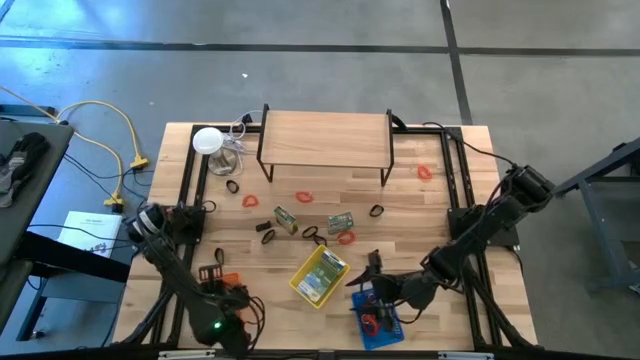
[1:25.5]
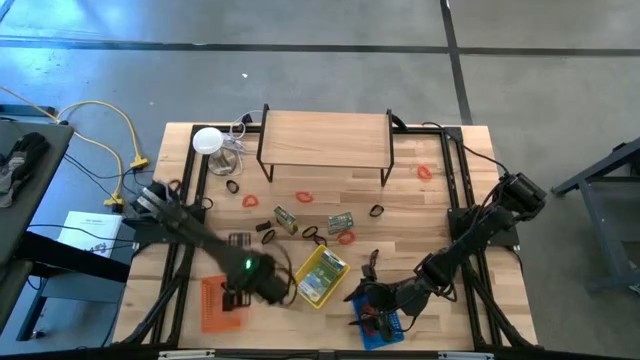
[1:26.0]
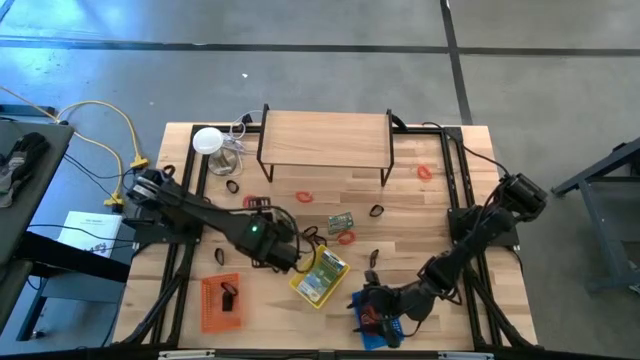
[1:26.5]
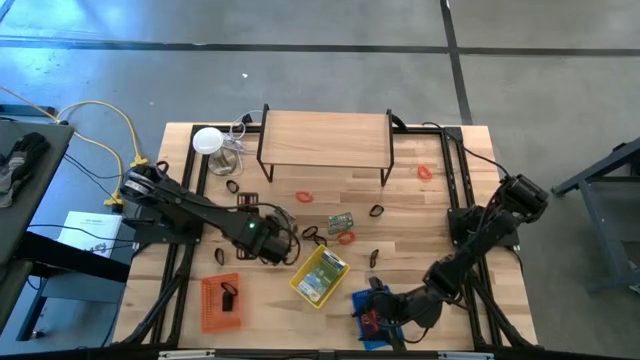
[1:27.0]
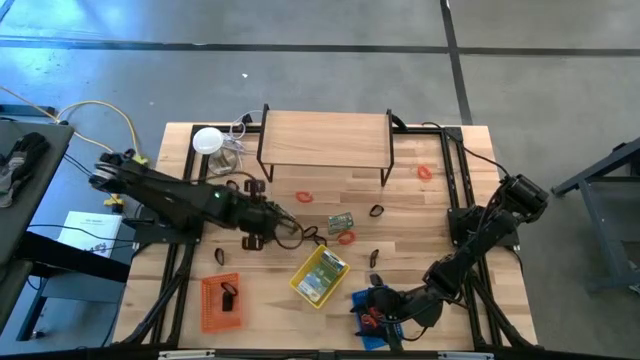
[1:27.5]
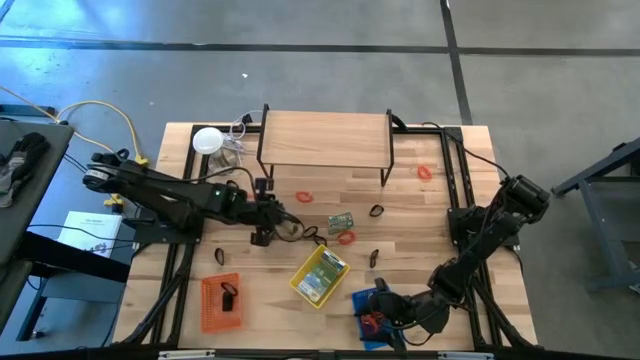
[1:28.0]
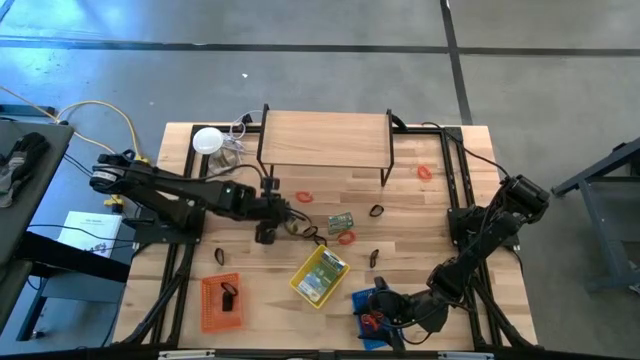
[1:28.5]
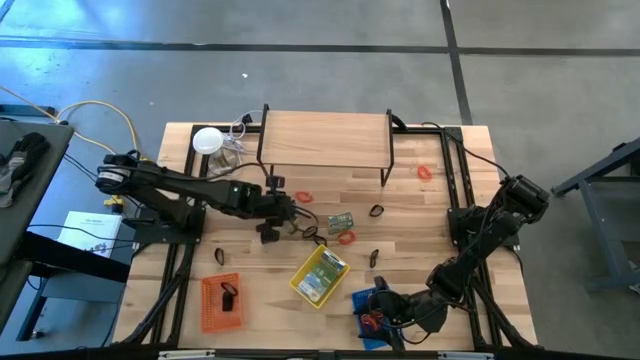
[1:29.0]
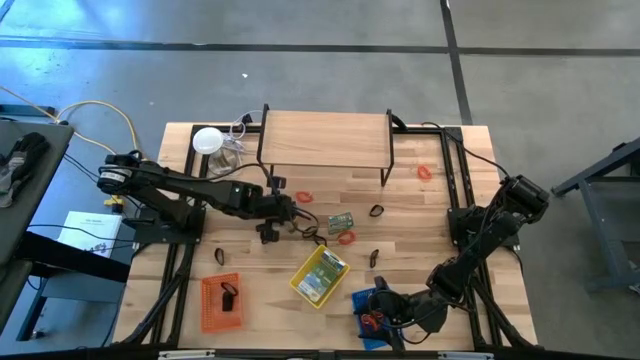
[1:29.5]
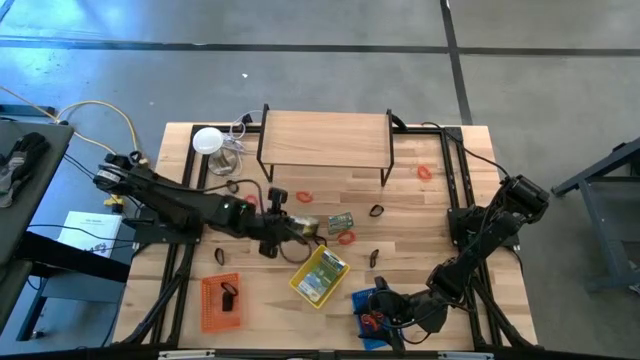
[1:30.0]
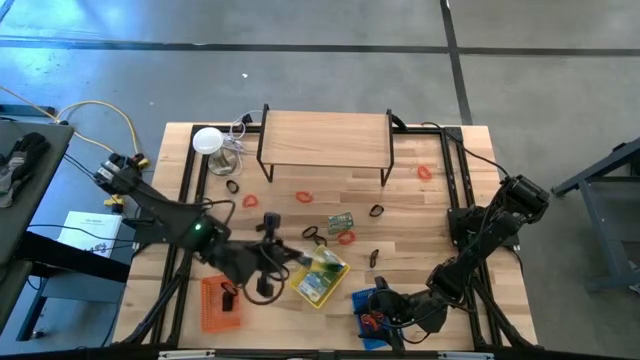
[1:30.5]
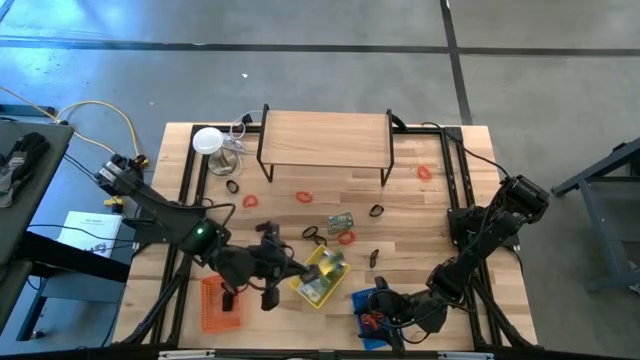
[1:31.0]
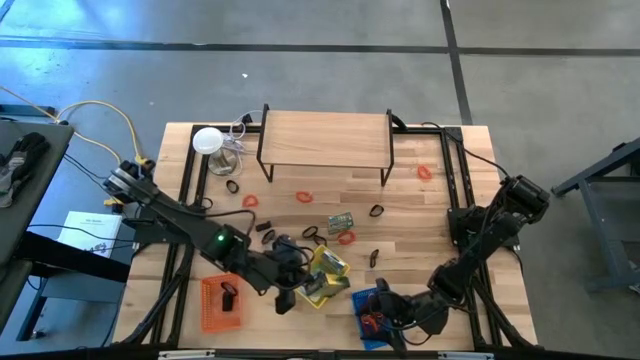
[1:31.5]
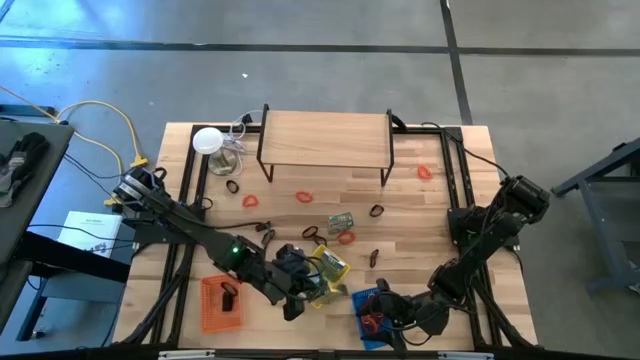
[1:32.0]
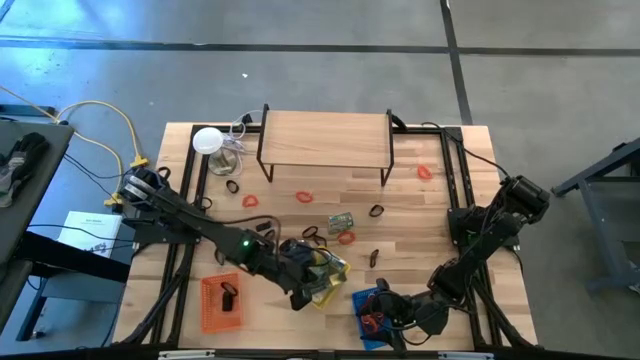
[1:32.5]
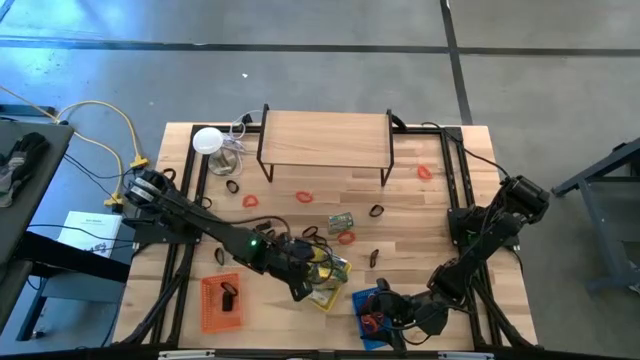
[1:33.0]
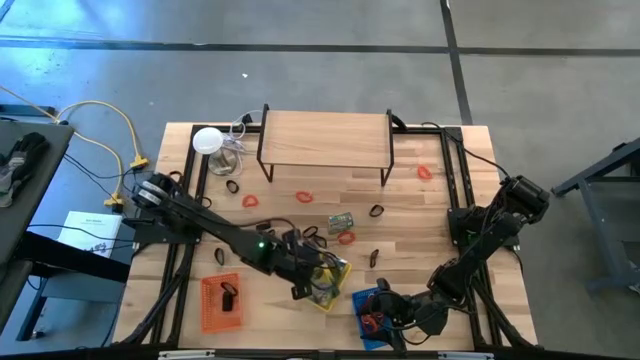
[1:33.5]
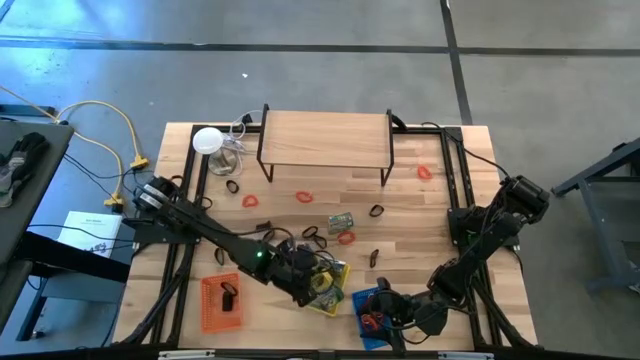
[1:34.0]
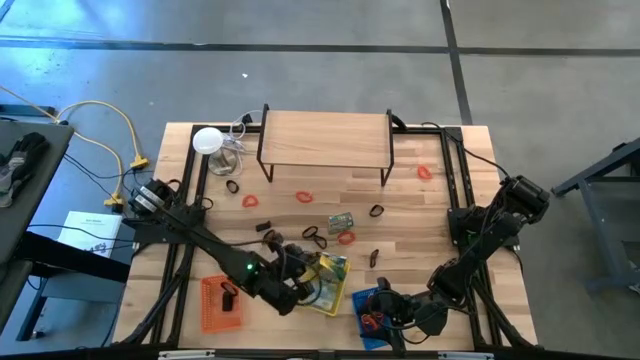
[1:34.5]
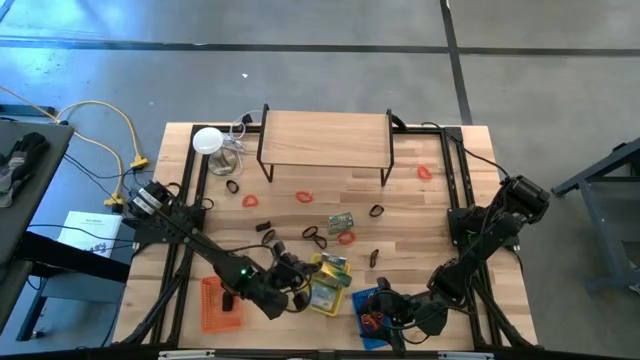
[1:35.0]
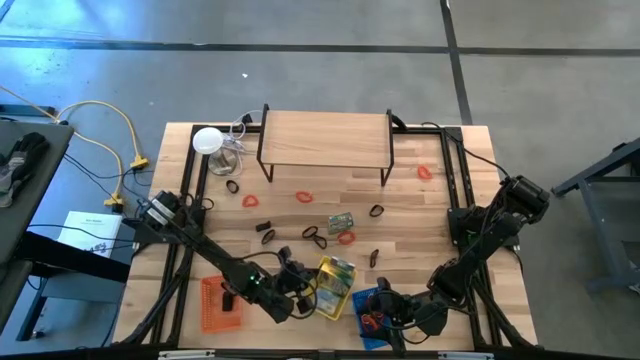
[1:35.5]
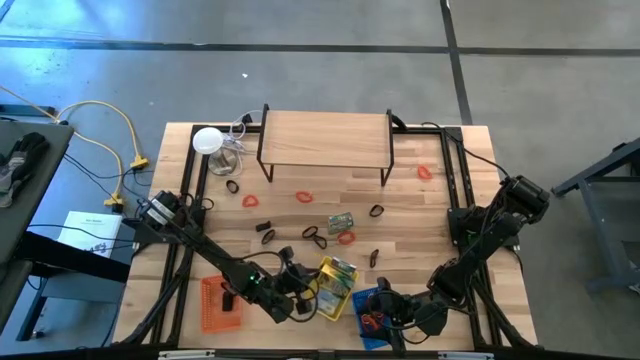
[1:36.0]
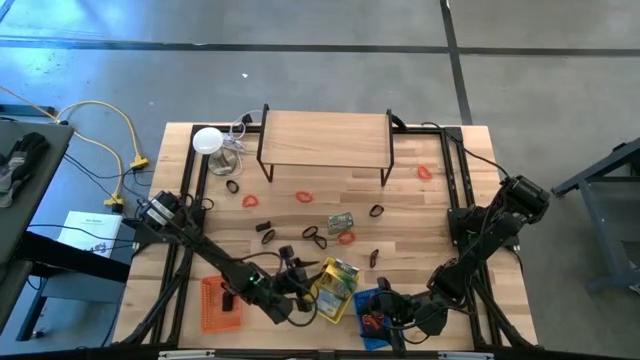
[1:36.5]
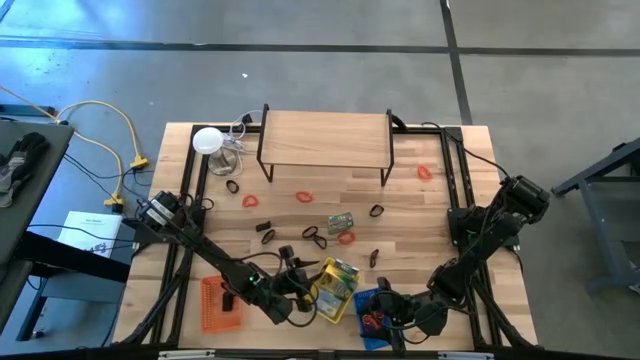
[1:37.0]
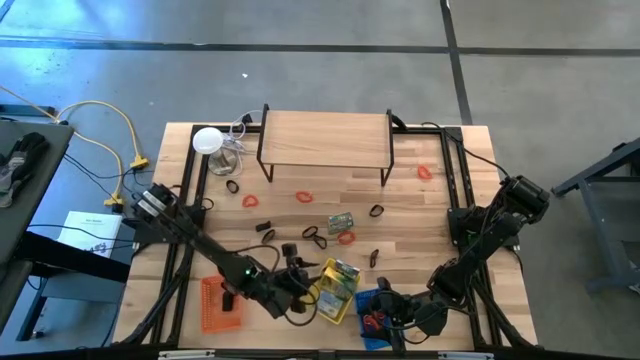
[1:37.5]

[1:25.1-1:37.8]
Task: Pick & Place Office Desk Supplies
Put the left yellow crayon box into the yellow box

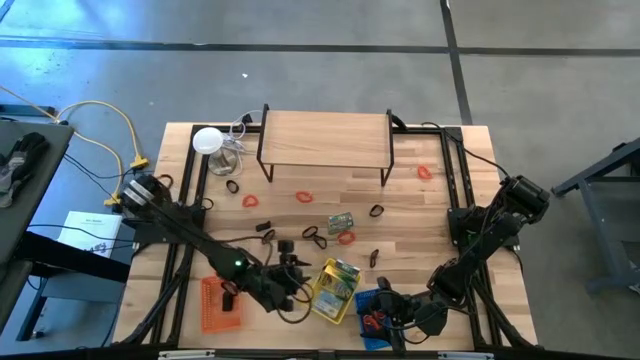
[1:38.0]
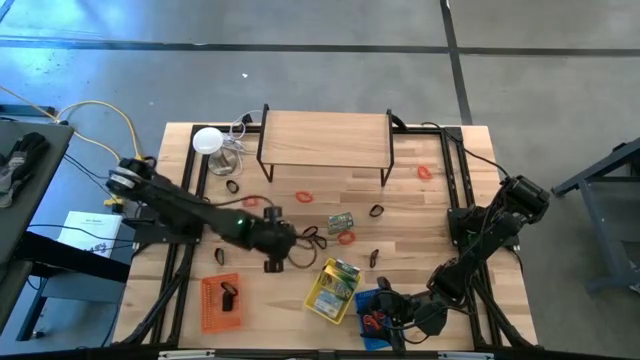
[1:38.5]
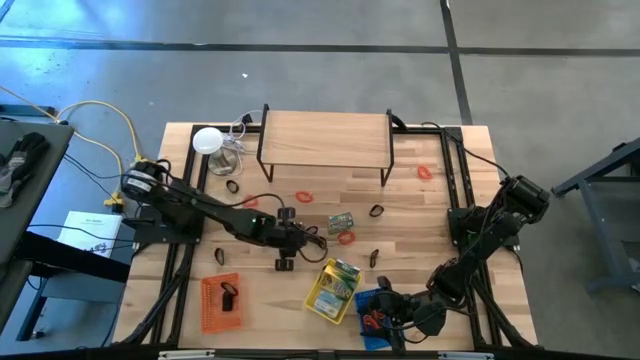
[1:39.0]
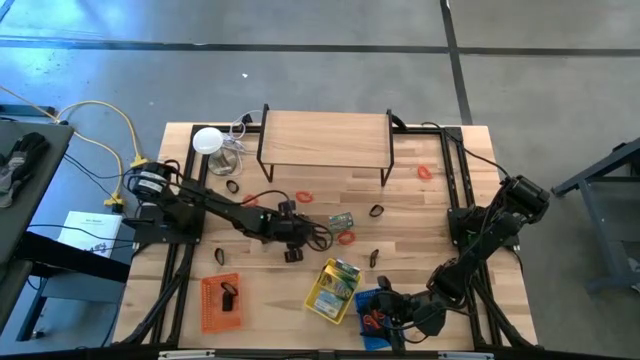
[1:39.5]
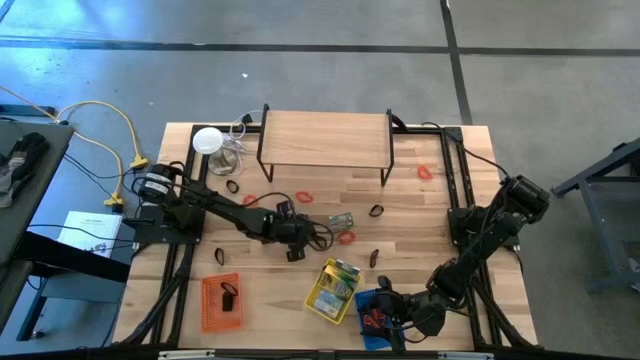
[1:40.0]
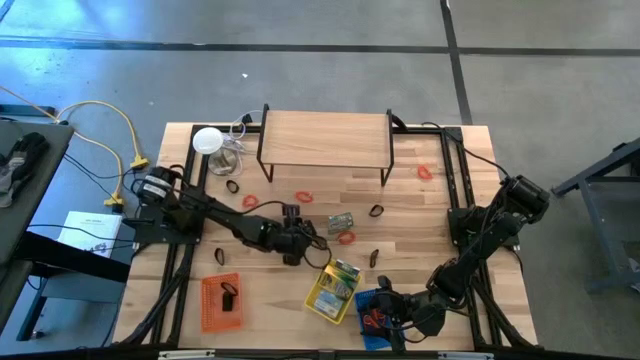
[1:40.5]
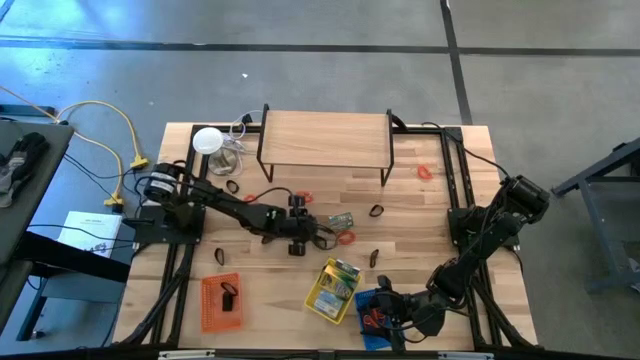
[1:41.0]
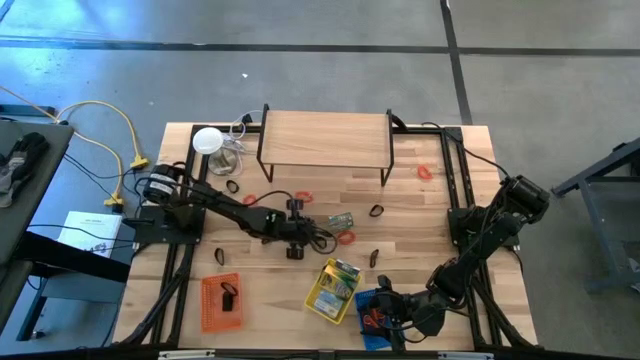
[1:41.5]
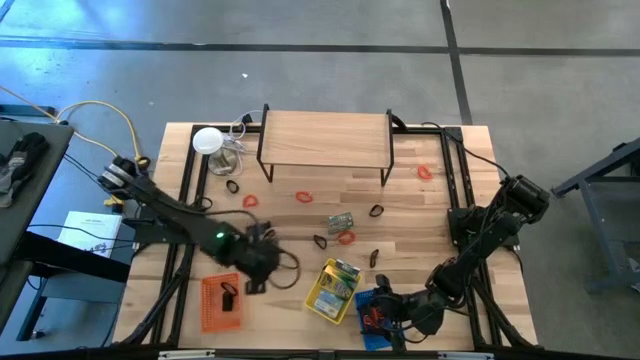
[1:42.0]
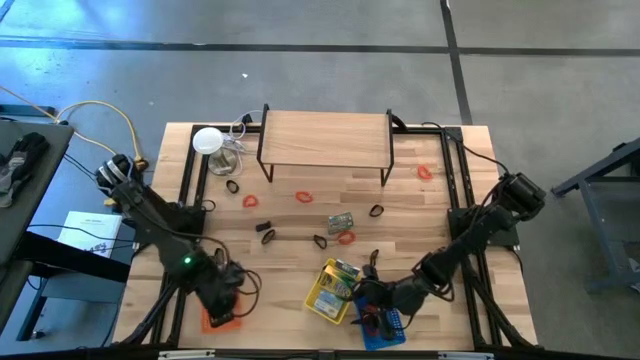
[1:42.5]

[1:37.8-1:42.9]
Put the black rubber band into the orange bin

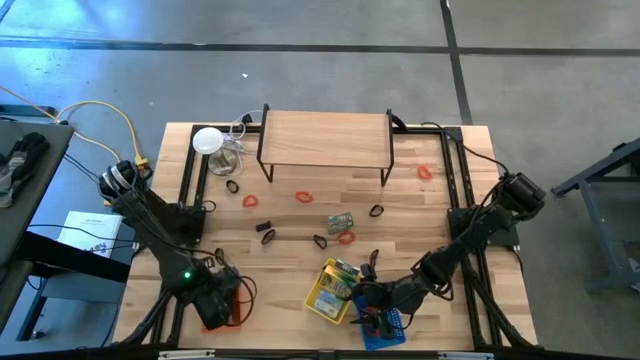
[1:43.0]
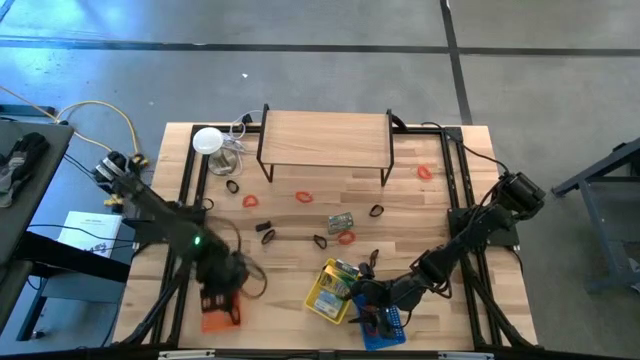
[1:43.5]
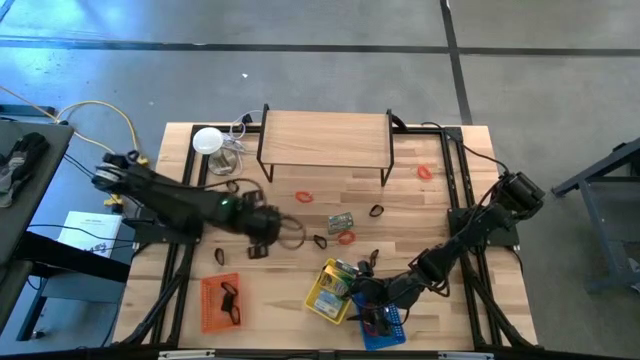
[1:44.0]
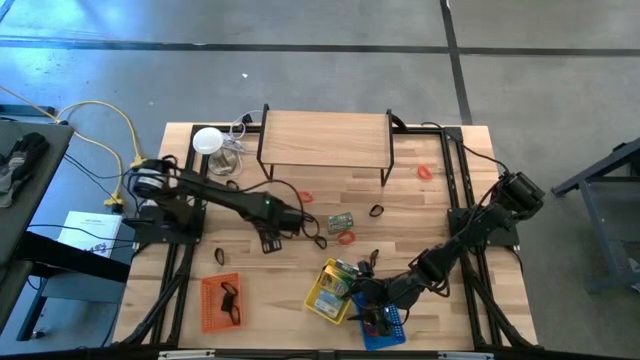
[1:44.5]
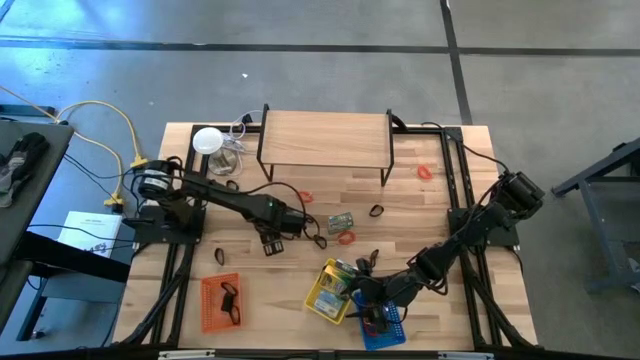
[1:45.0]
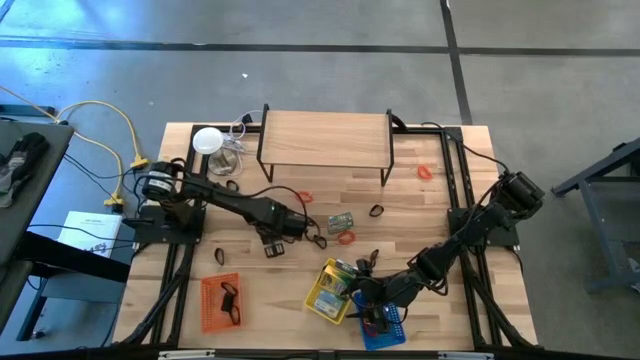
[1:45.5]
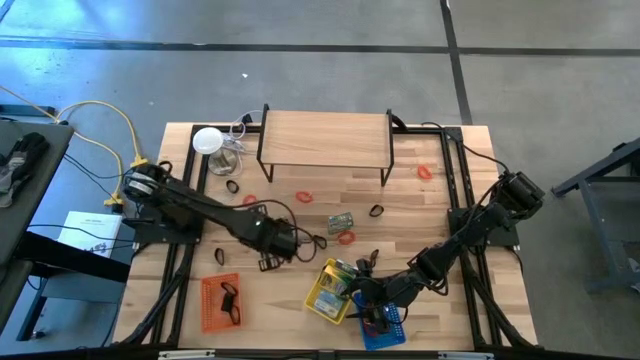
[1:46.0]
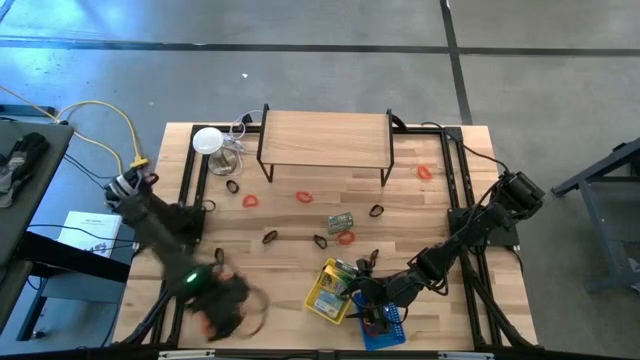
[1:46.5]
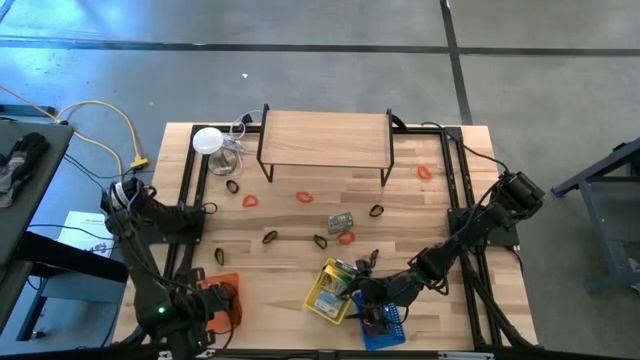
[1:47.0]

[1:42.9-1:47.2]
Put the black rubber band into the orange bin
